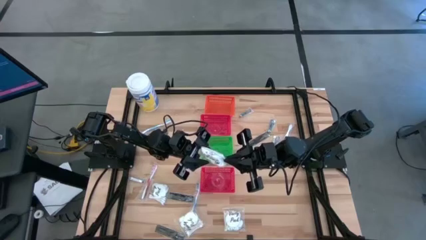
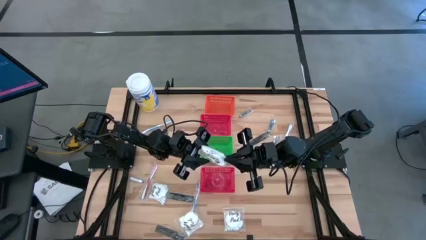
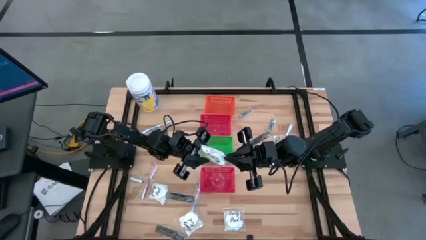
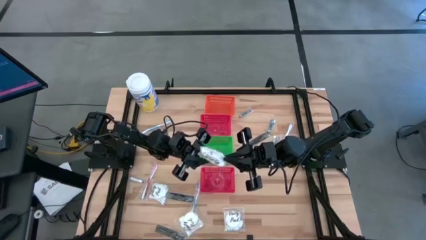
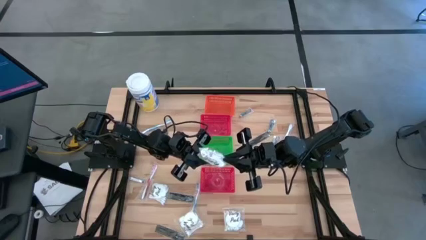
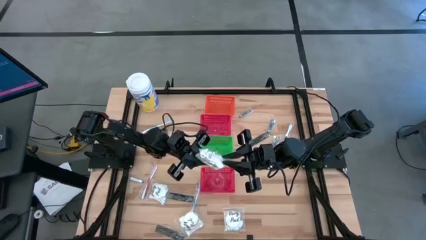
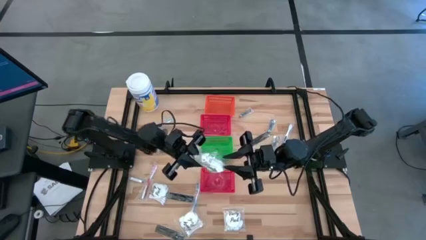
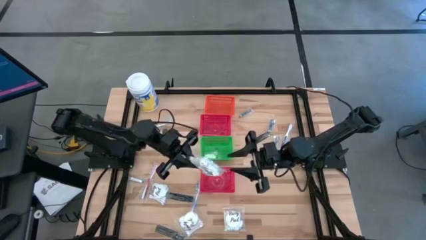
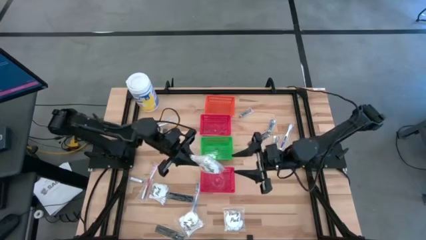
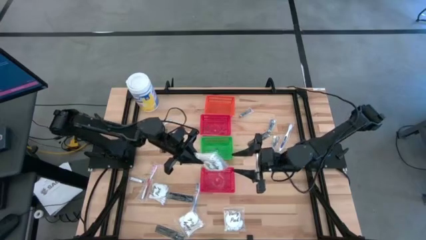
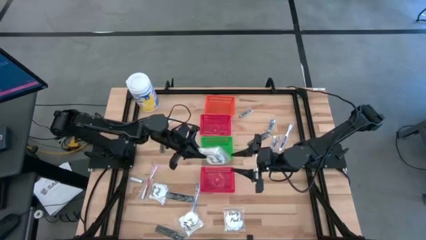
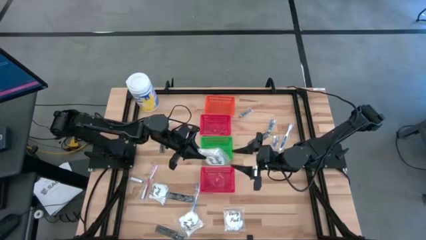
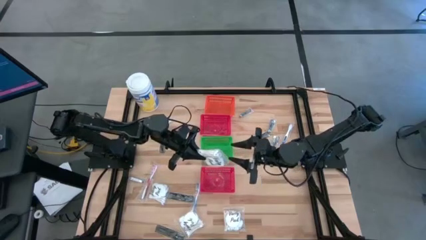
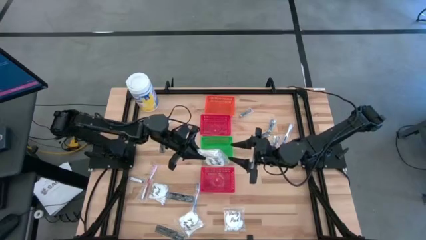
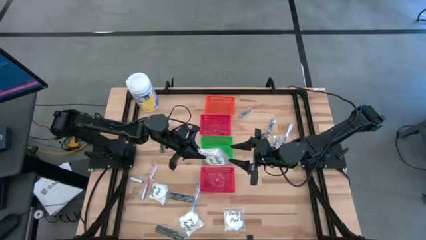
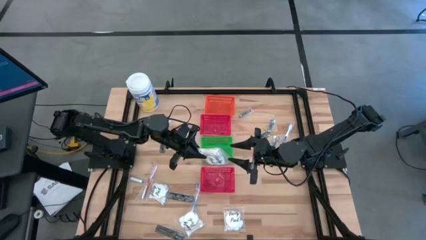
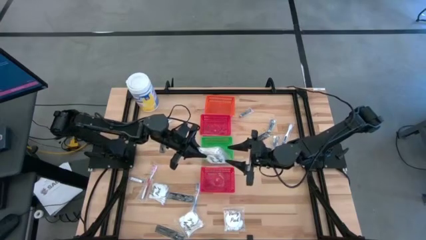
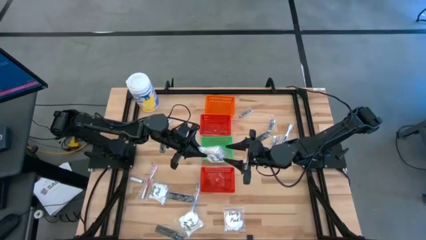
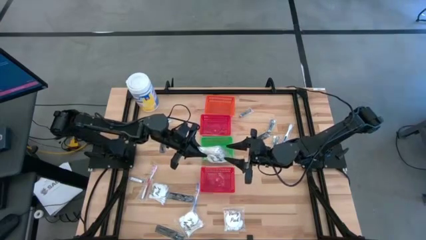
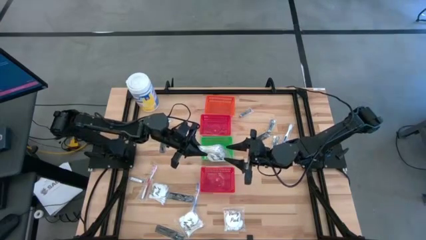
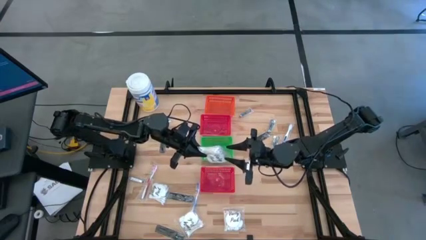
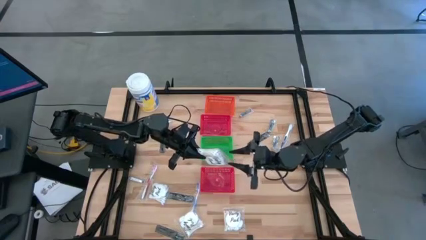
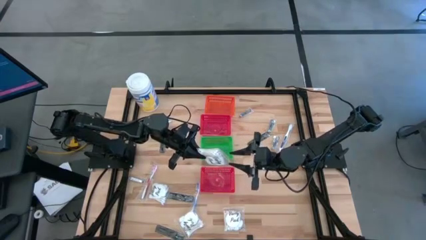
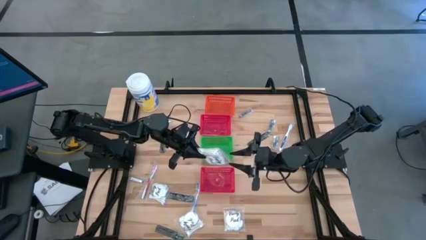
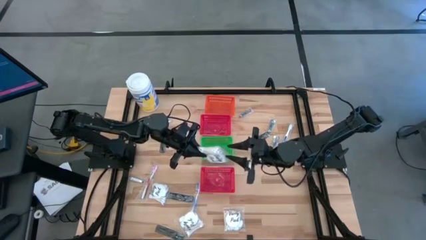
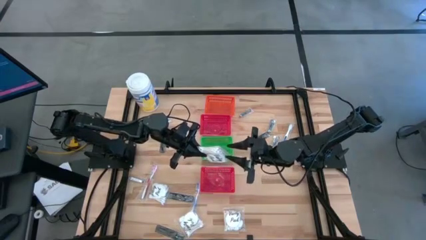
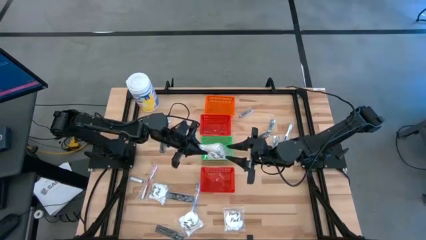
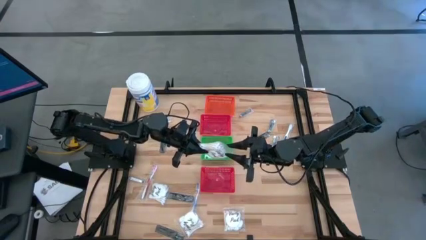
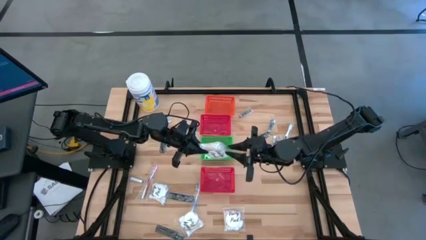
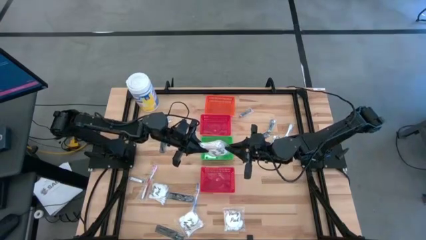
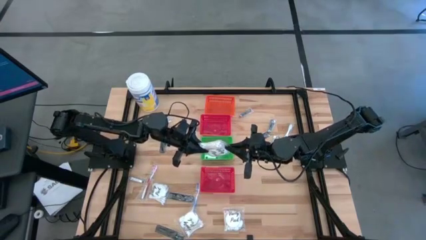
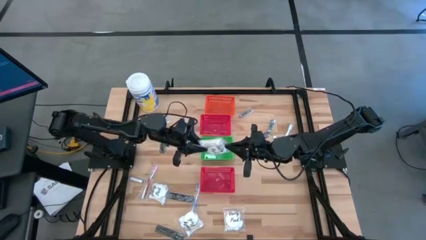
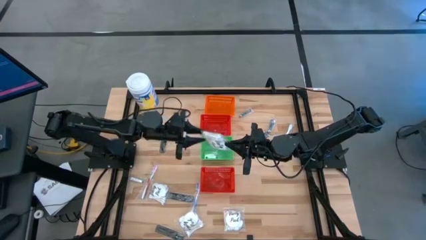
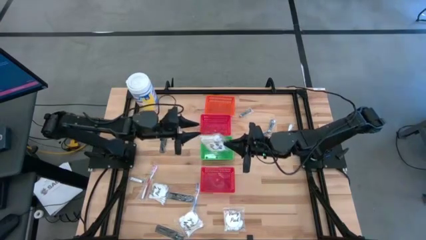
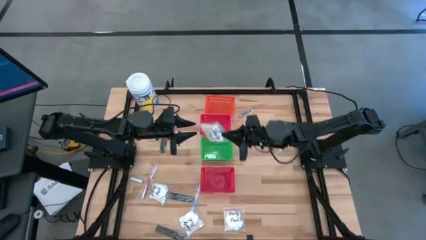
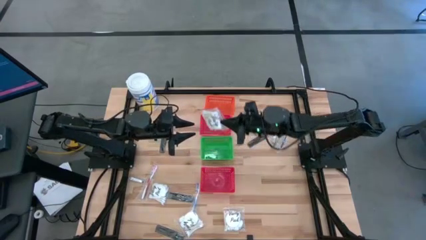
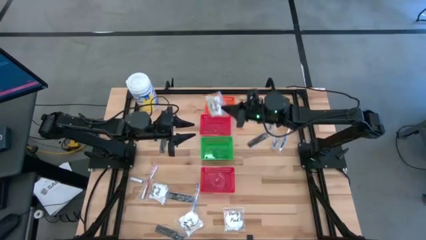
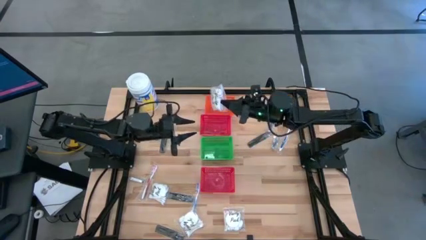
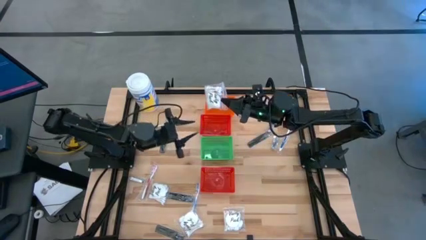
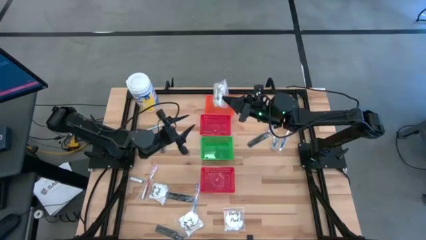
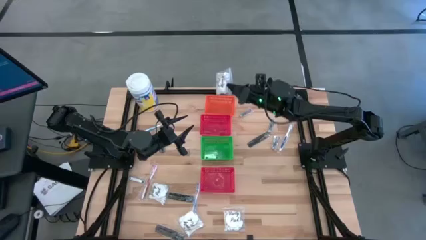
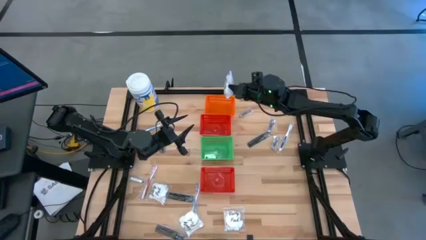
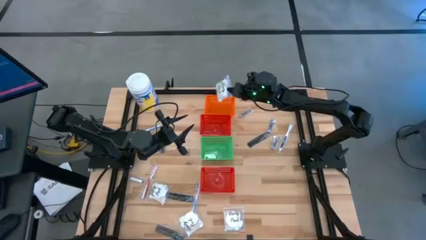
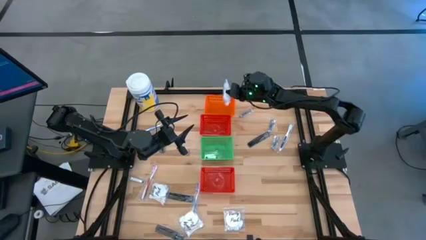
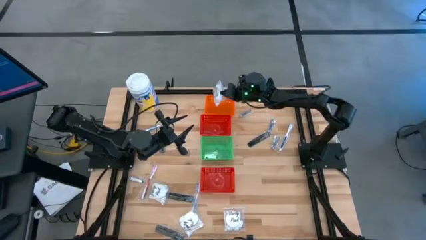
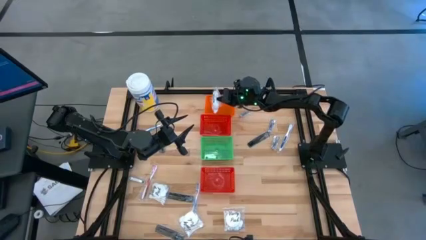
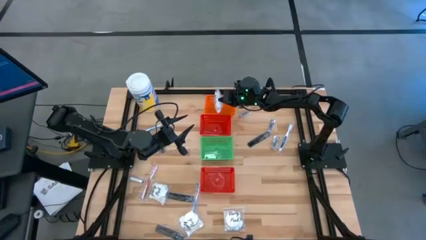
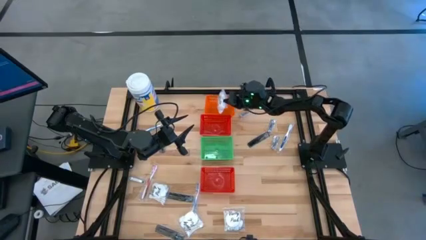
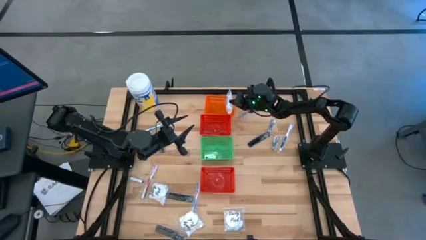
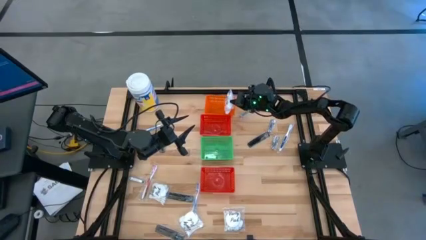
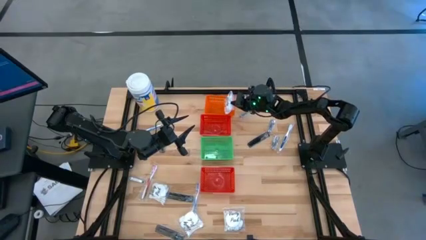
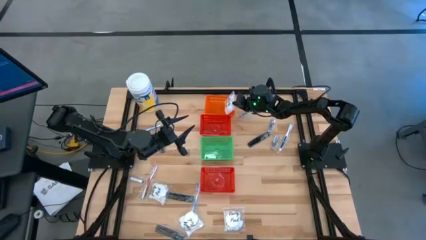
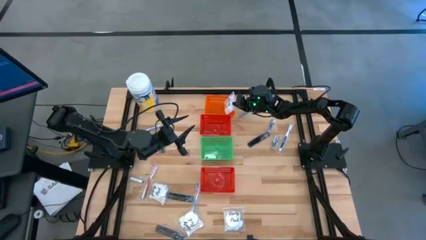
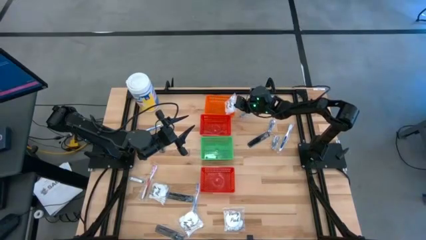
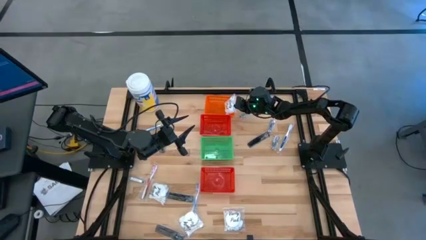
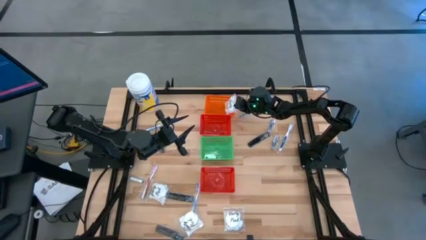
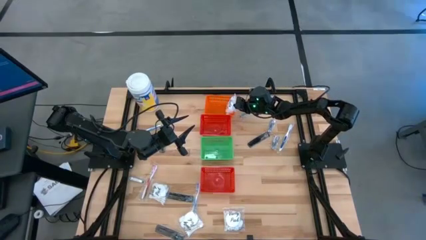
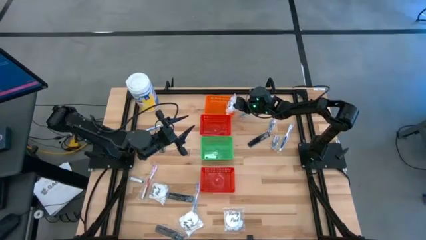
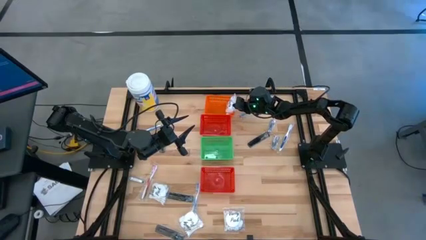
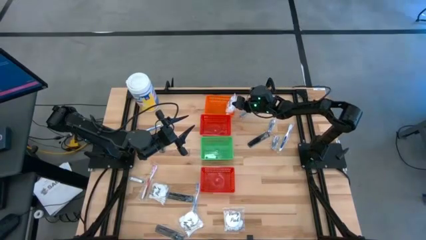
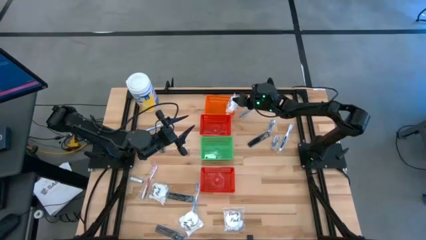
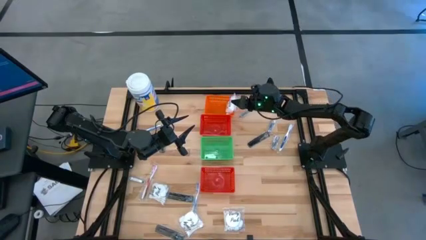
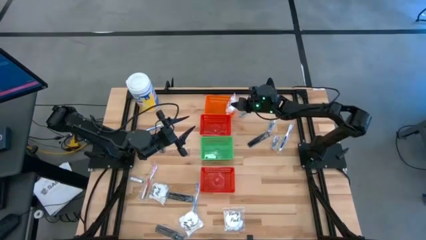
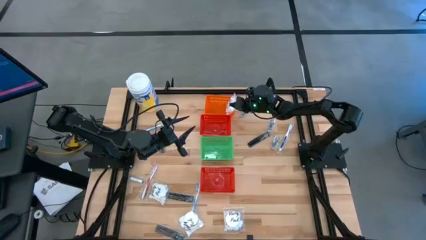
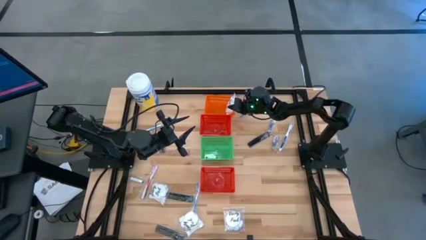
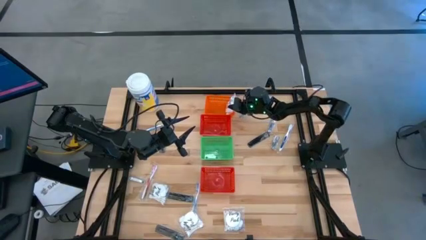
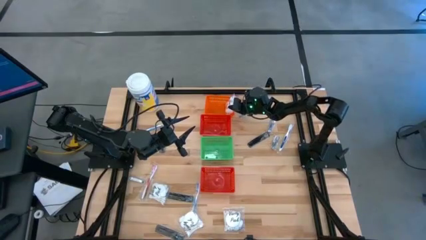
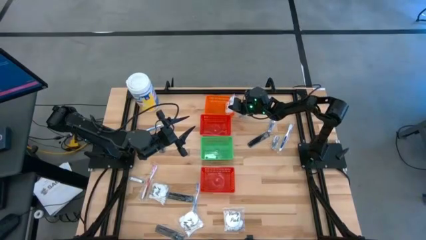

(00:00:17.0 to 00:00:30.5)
Task: Pick & Place Travel size toiletries
Put the transparent cotton pack into the orange basket
